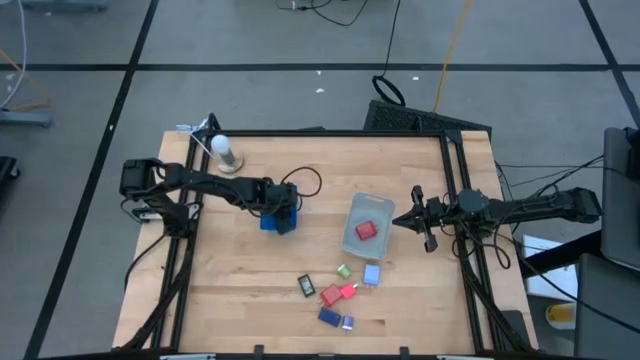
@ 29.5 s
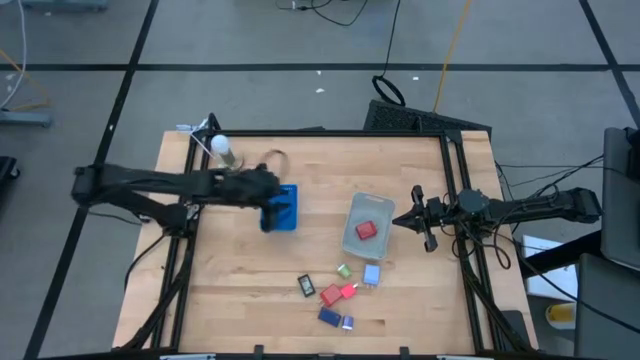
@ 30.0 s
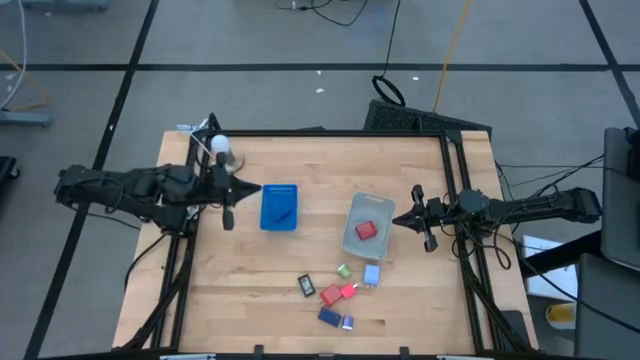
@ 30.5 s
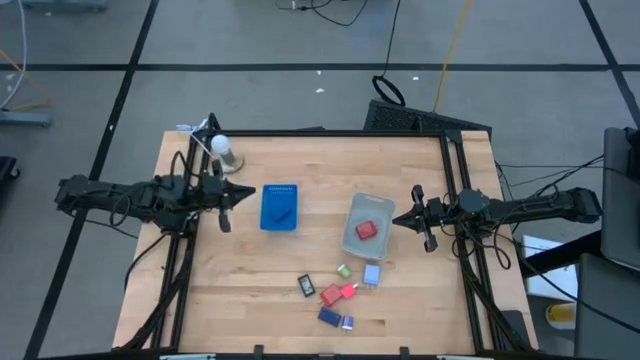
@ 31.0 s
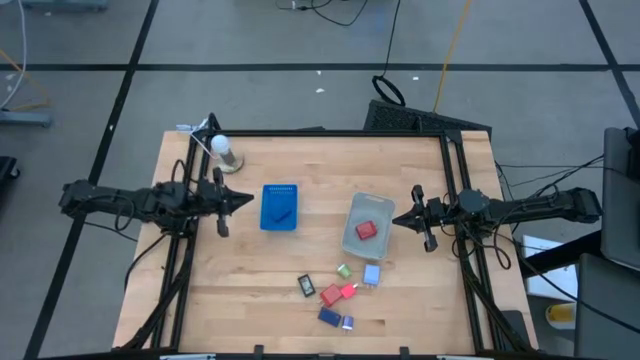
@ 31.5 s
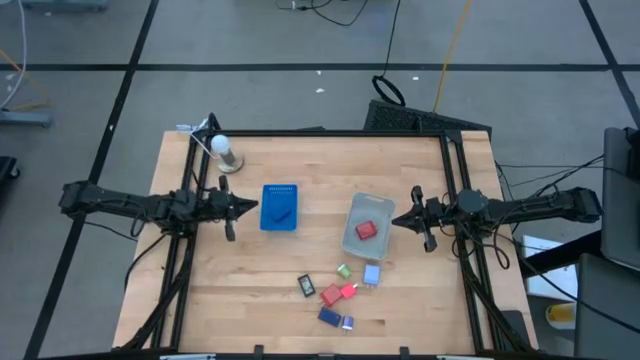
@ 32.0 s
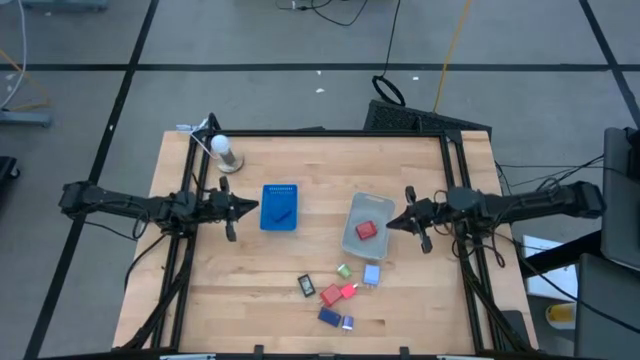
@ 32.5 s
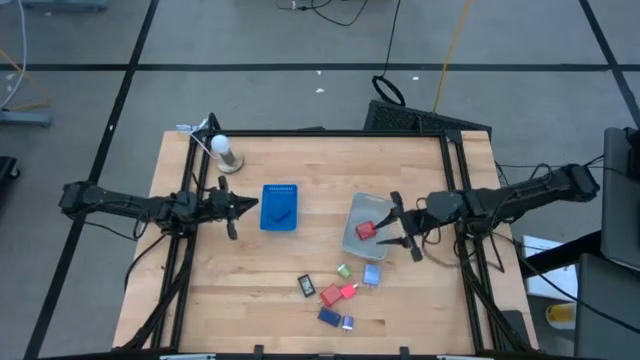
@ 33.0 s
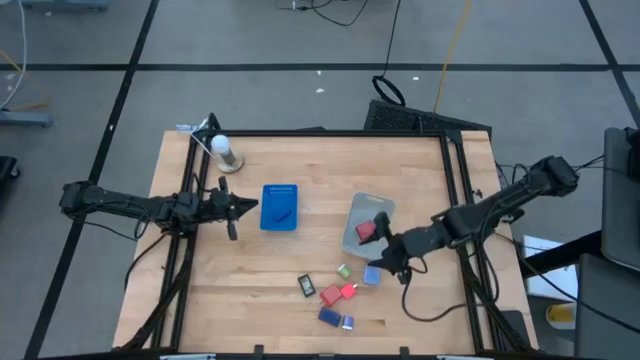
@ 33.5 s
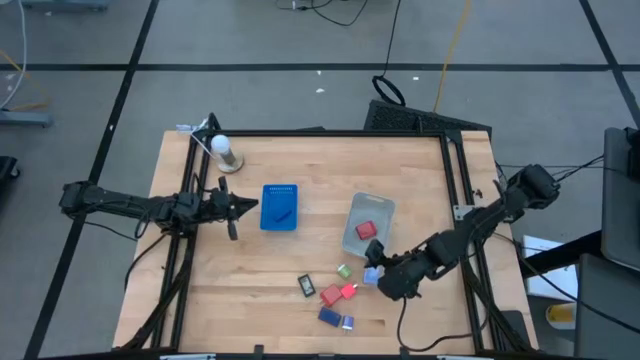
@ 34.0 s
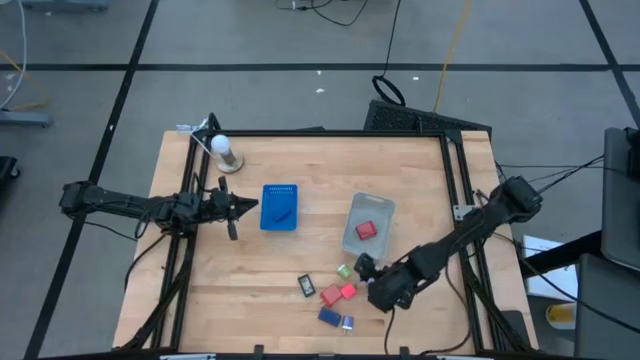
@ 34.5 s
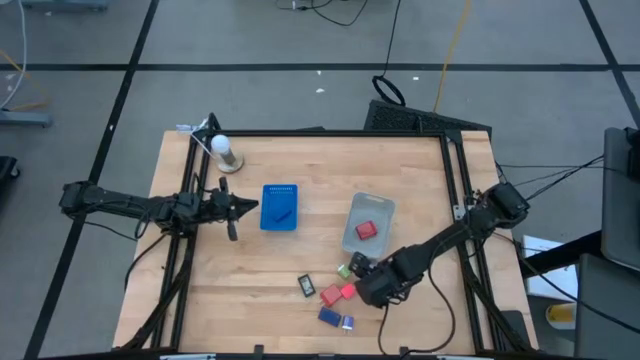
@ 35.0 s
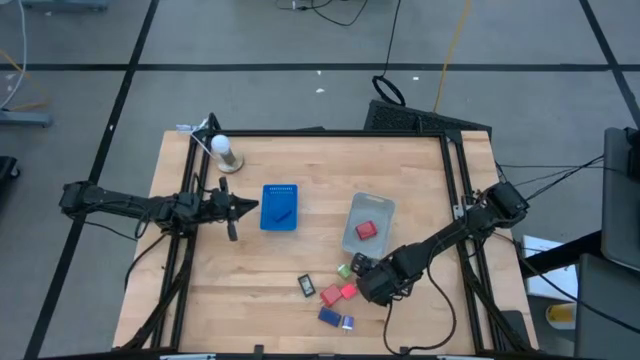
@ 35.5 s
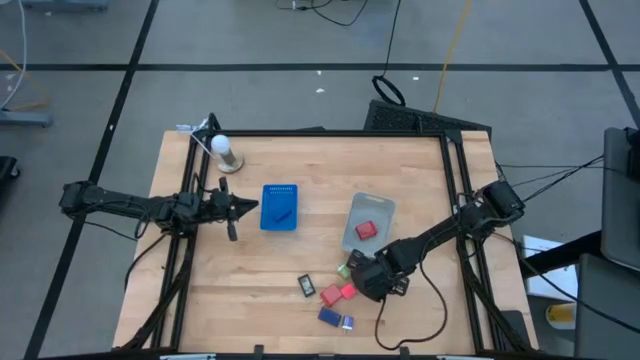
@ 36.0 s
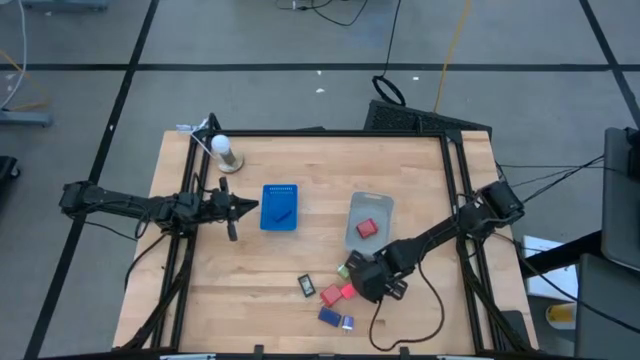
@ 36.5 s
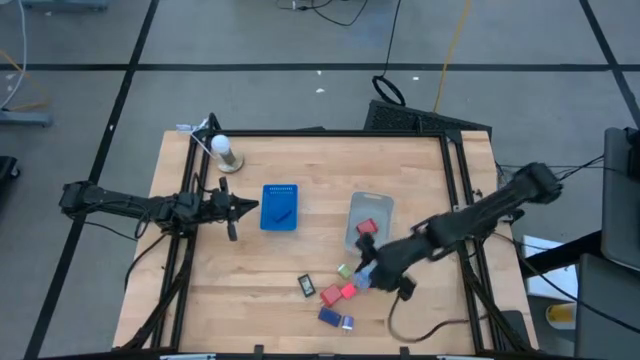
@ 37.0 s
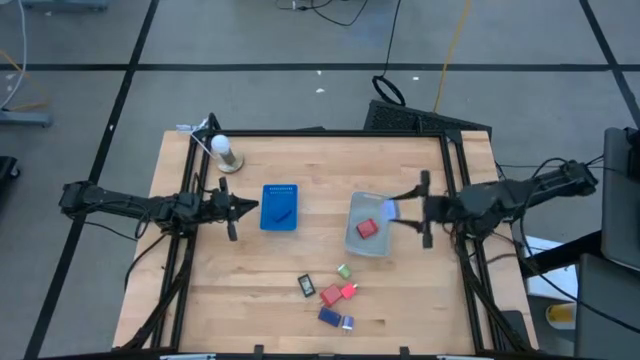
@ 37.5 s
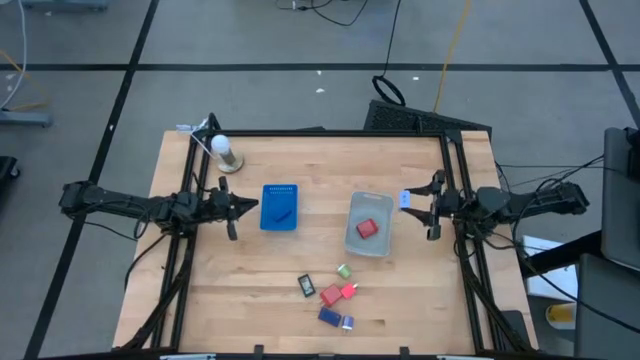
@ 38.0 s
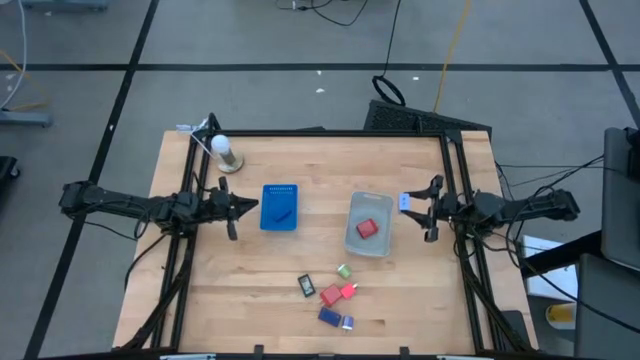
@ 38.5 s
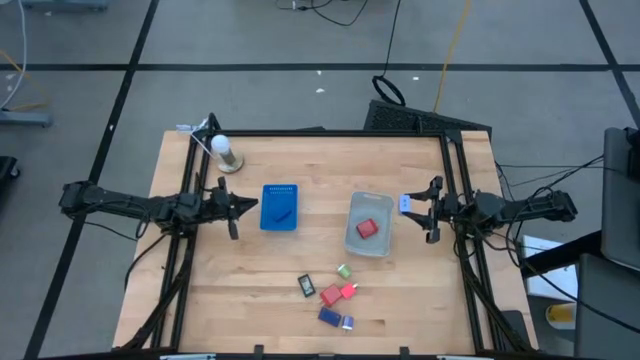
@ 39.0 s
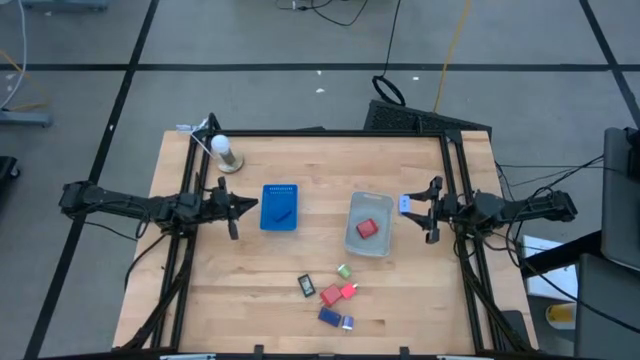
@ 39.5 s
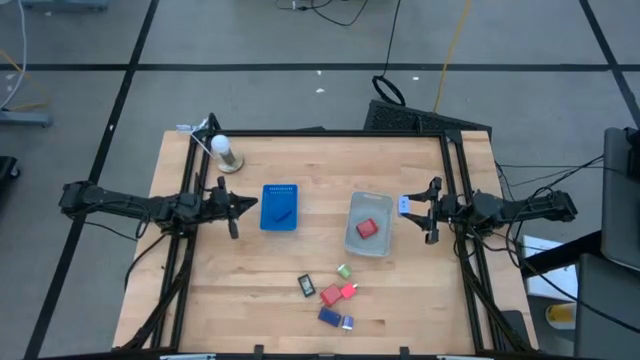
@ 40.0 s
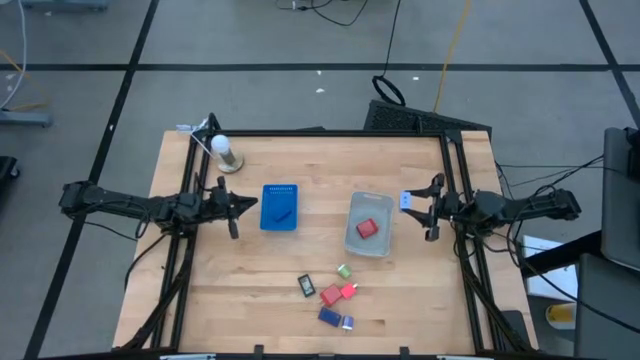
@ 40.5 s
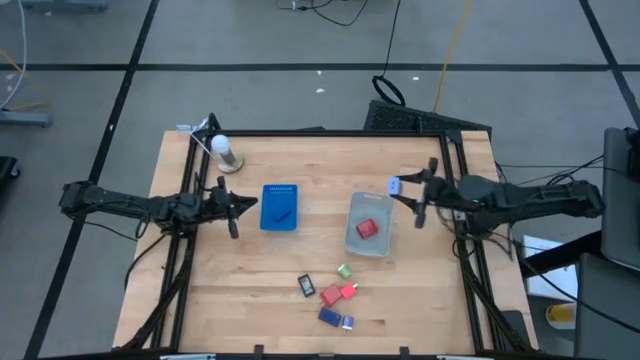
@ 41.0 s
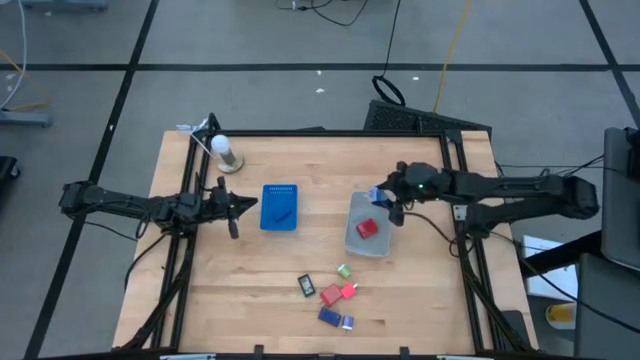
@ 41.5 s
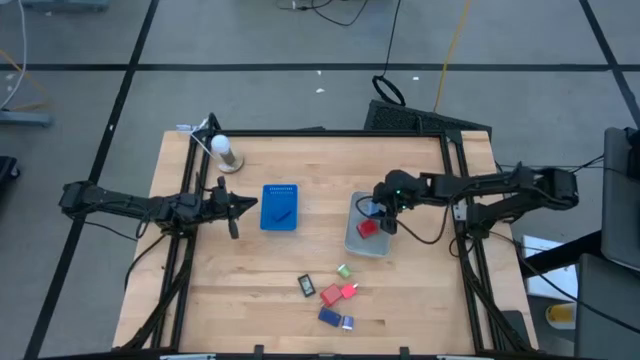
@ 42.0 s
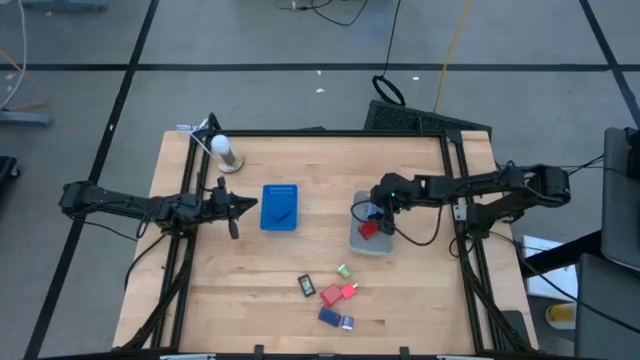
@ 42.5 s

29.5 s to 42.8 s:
Task: Pick & Place Office items
Put the blue charger adapter into the gray bin

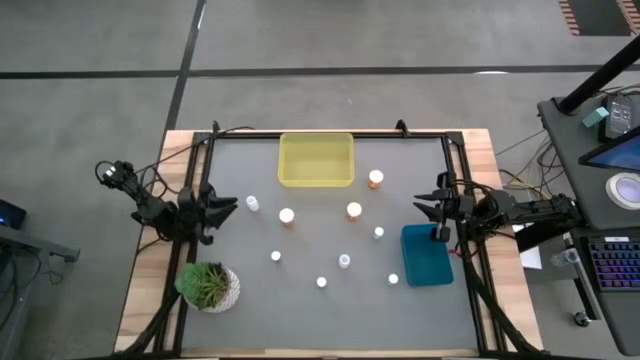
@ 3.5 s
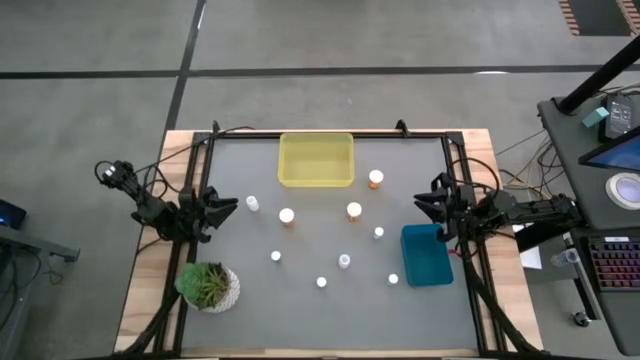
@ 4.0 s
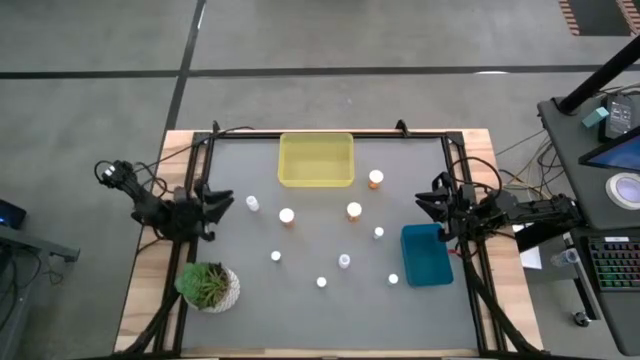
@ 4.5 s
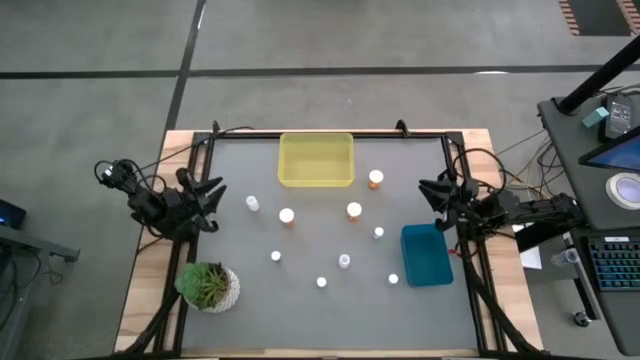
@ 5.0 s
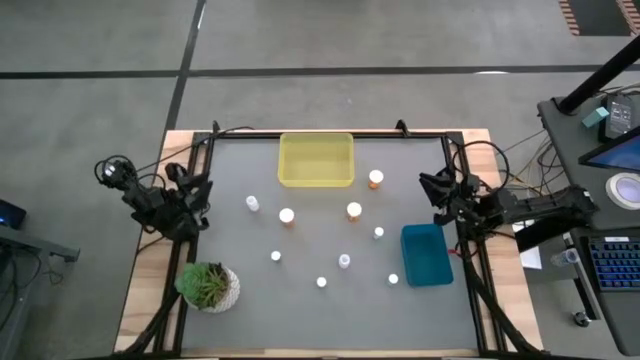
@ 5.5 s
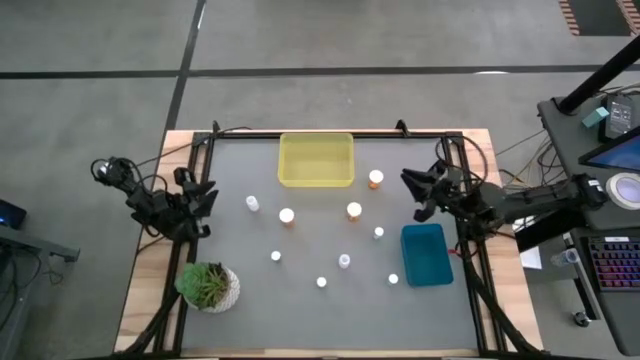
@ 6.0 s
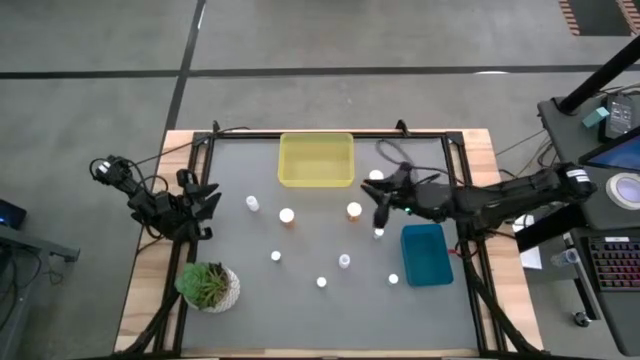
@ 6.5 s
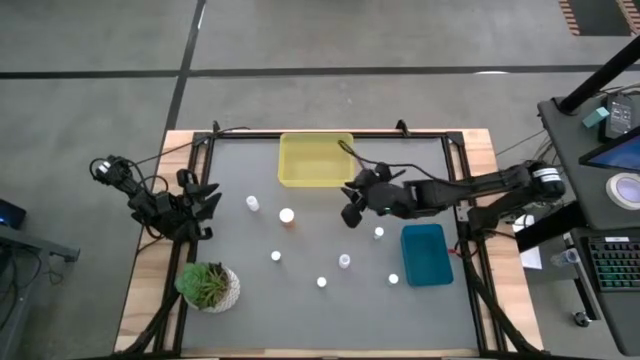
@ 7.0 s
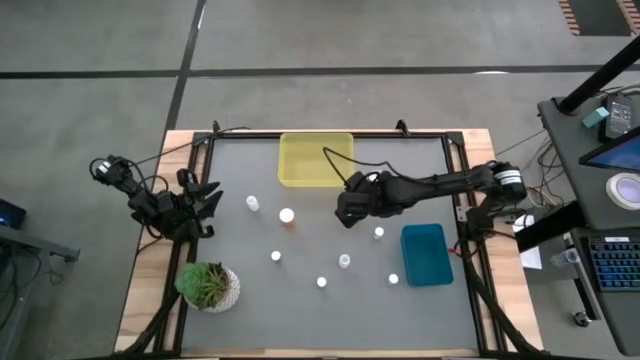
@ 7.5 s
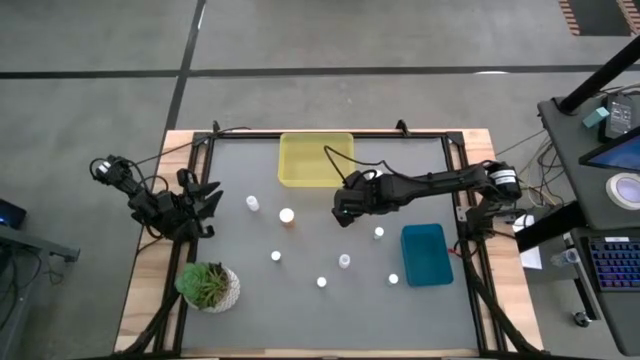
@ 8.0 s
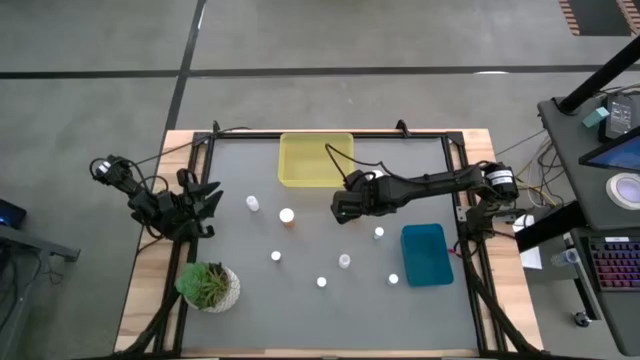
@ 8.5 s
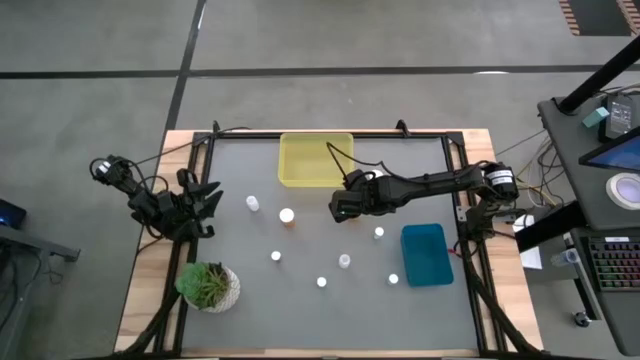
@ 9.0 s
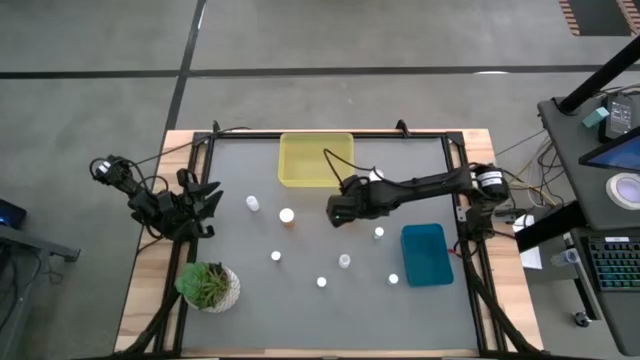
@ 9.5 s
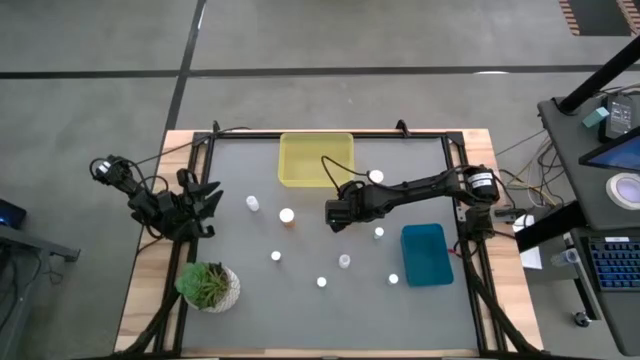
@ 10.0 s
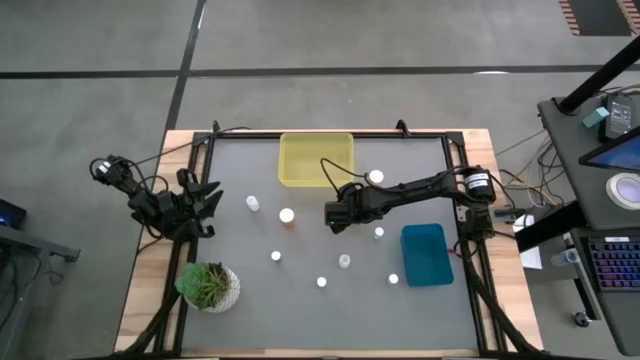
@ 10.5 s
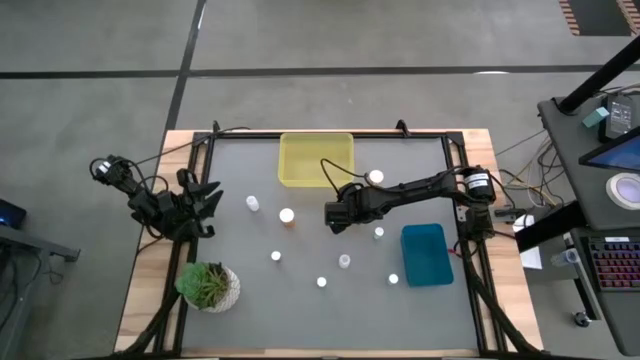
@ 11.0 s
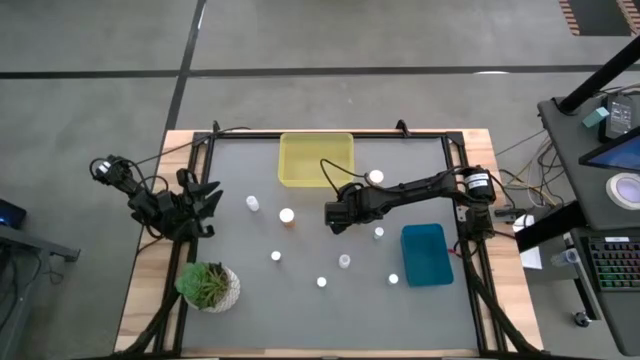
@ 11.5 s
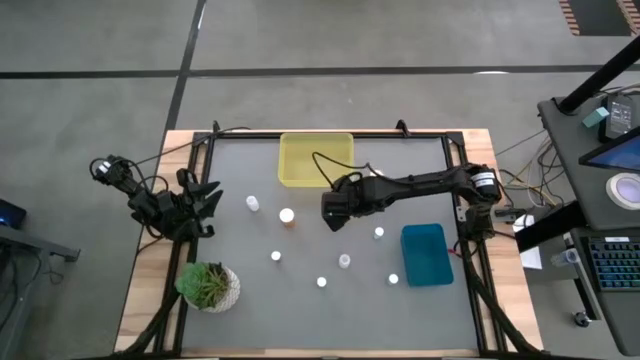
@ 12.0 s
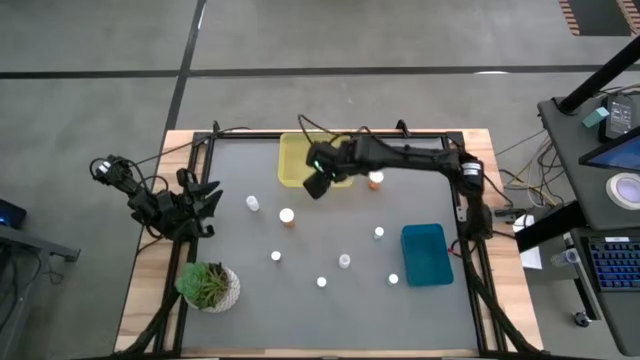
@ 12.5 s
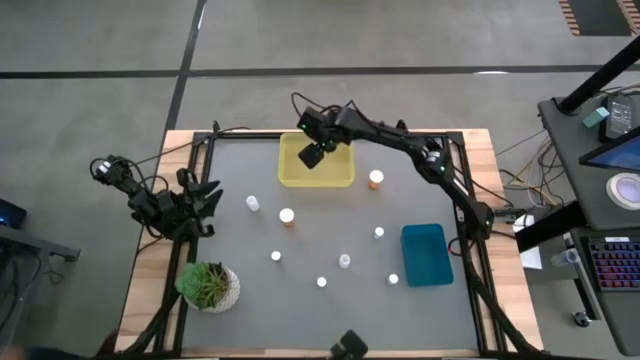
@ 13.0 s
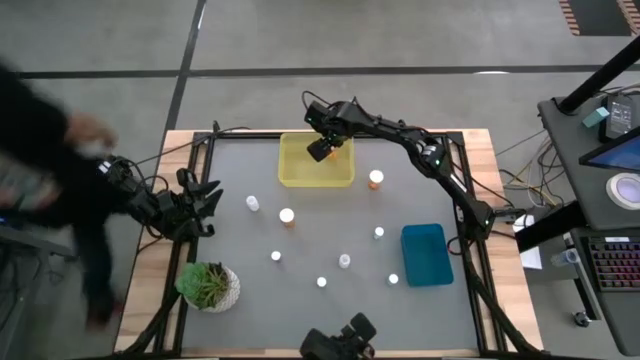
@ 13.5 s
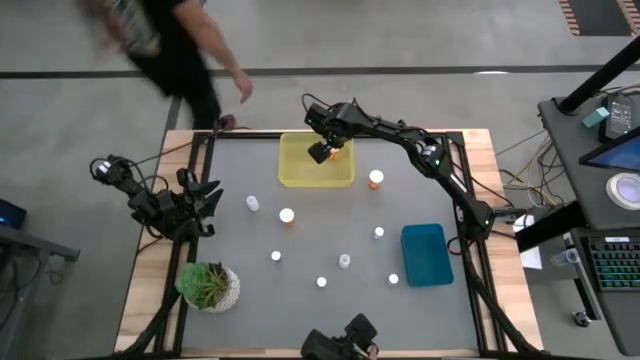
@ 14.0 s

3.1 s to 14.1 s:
Task: Pick and place medicine bottles into bin by pill shape (circle, oval)
Put the orange pill bottle into the yellow bin
